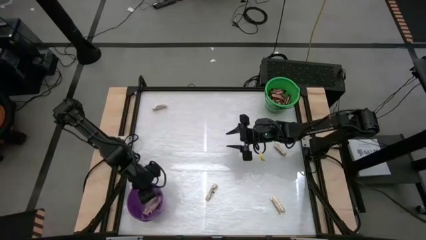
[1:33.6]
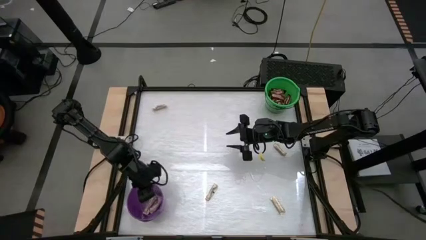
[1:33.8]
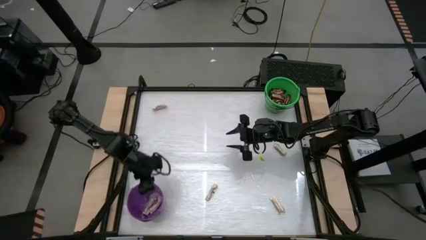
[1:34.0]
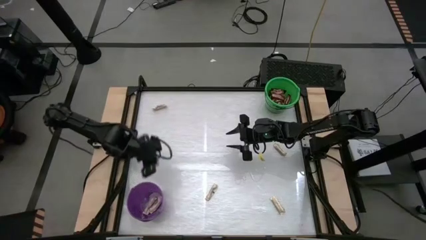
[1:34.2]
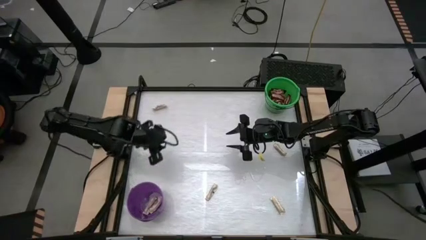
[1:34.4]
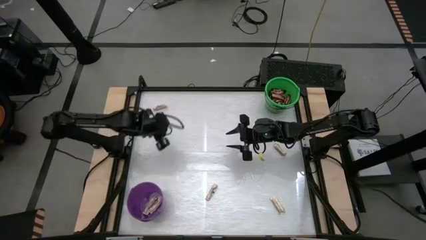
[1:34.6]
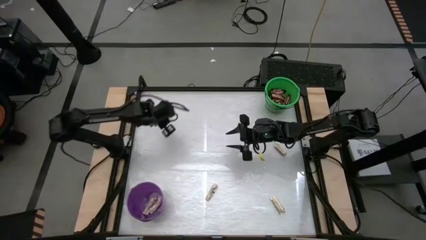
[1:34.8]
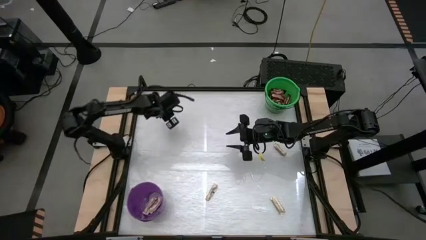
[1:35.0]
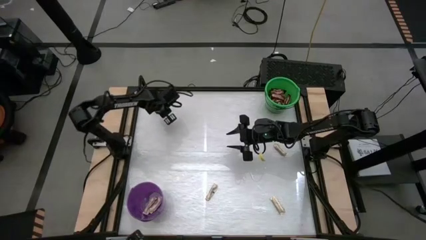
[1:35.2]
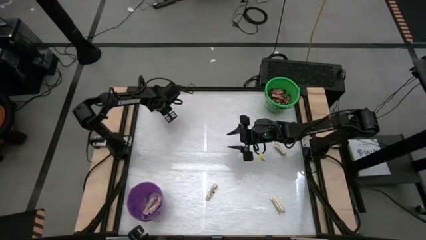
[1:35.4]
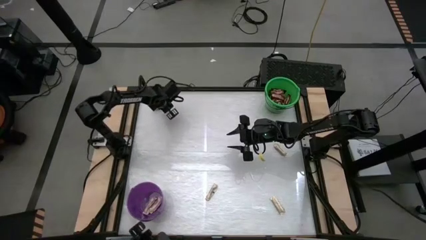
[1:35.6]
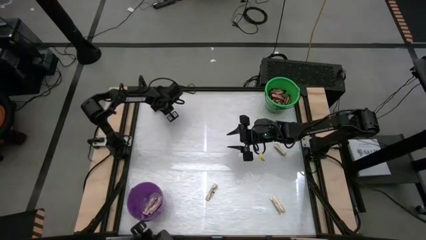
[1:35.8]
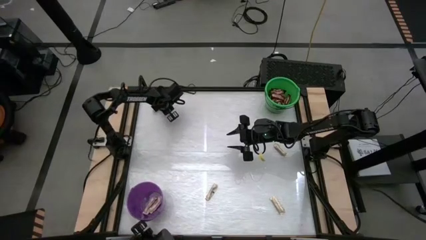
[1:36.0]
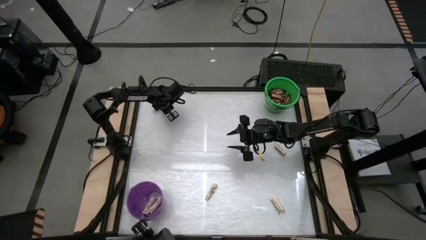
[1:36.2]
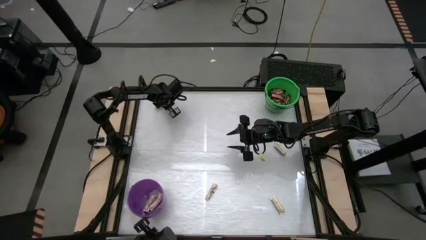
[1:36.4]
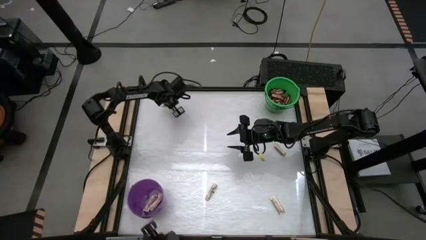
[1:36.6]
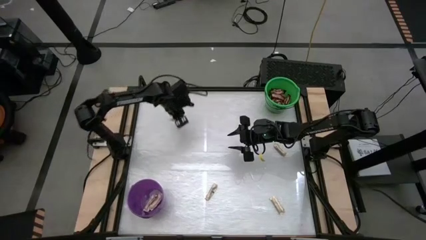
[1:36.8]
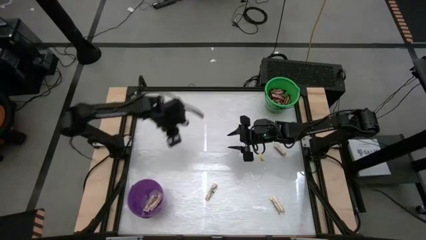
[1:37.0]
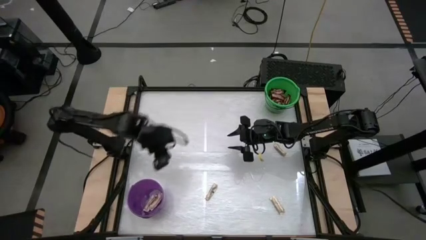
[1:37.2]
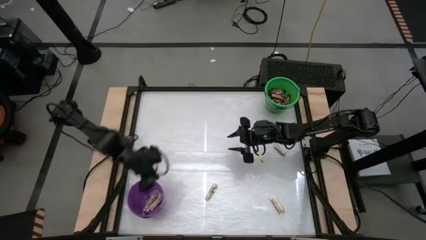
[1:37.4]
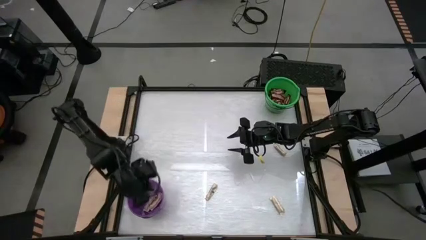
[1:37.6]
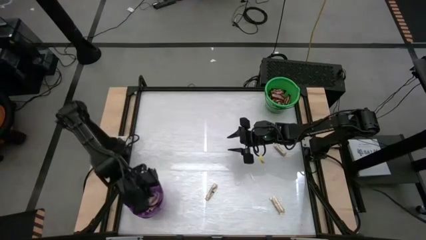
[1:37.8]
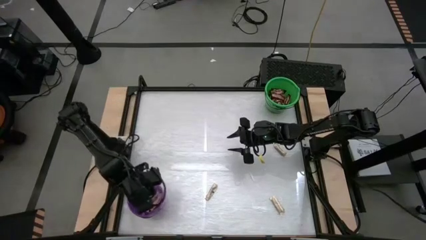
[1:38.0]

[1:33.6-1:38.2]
Task: Sort candy by brand, put in halloween buckets
Put the white candy bar into the purple bucket

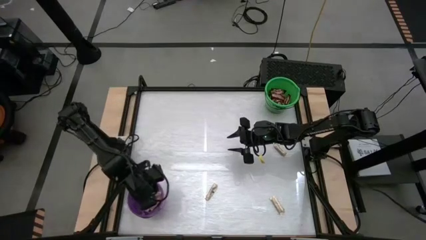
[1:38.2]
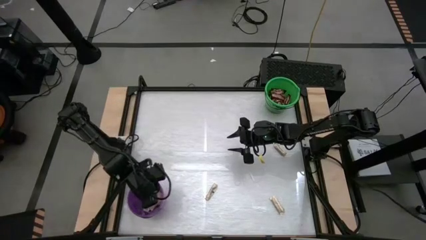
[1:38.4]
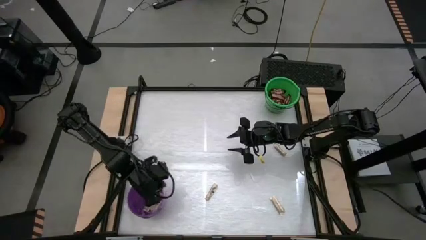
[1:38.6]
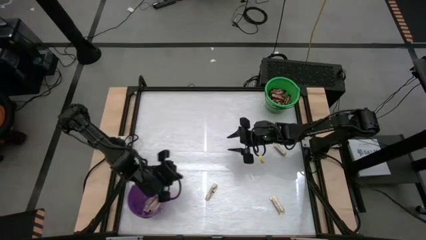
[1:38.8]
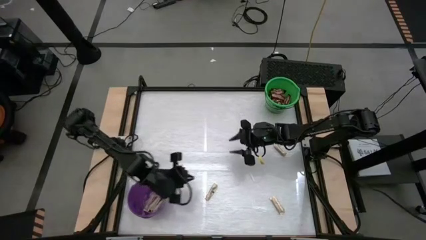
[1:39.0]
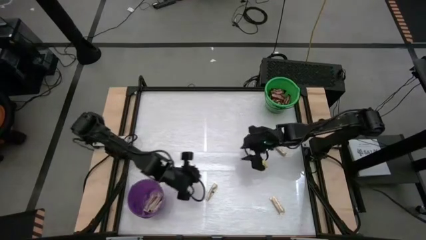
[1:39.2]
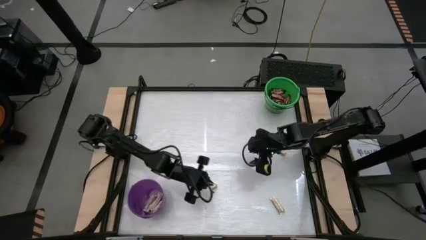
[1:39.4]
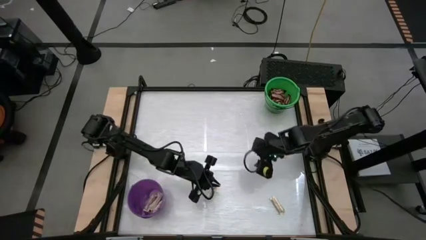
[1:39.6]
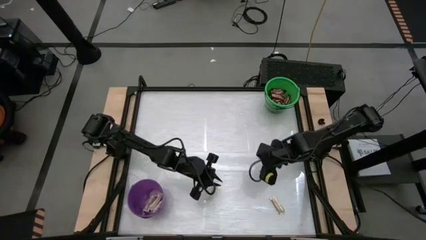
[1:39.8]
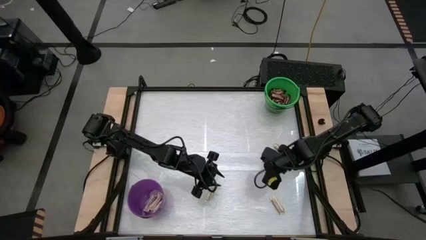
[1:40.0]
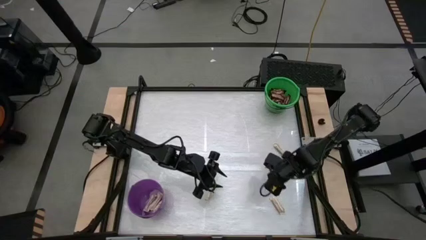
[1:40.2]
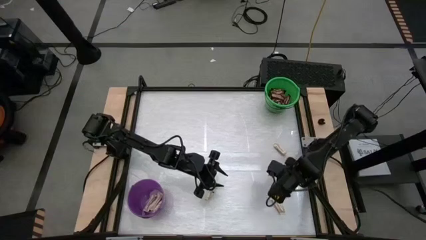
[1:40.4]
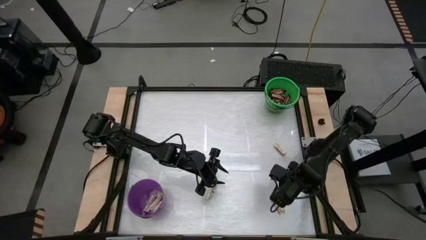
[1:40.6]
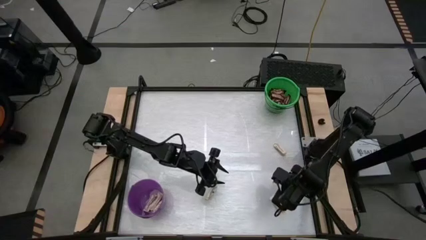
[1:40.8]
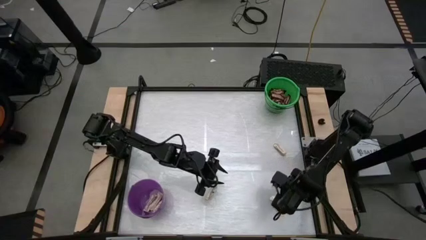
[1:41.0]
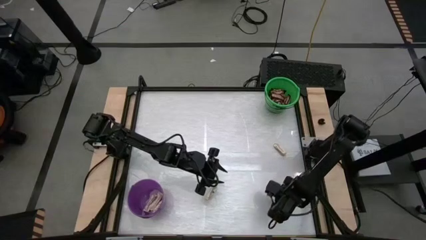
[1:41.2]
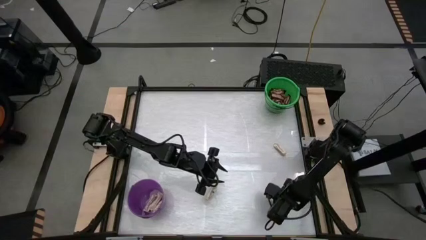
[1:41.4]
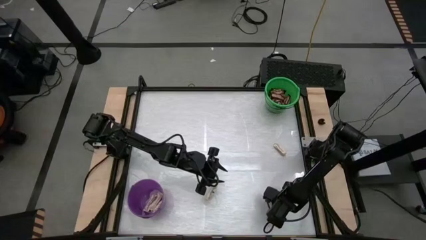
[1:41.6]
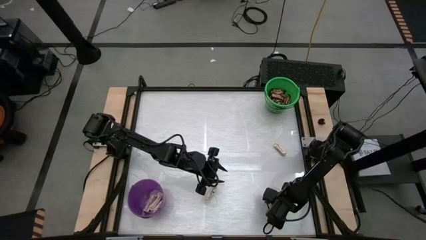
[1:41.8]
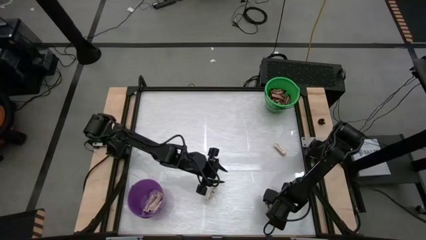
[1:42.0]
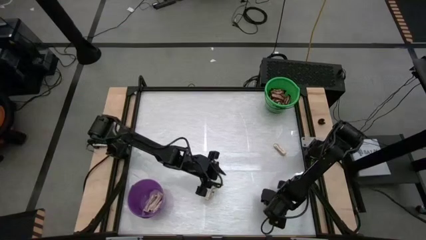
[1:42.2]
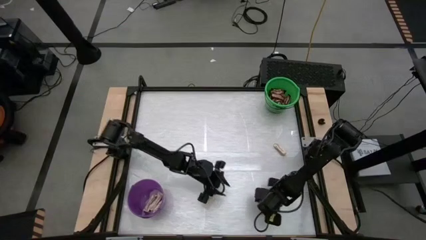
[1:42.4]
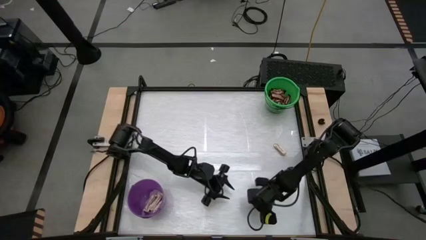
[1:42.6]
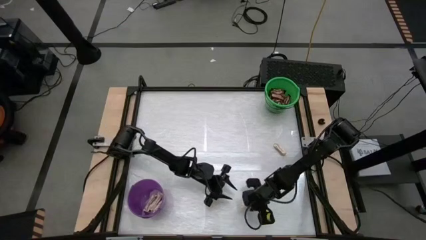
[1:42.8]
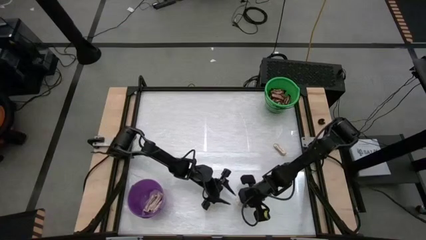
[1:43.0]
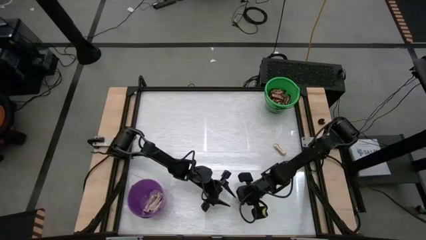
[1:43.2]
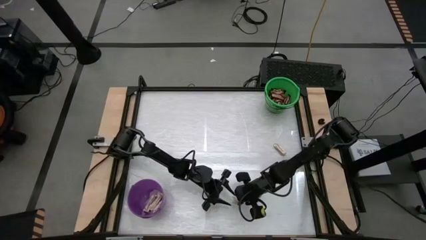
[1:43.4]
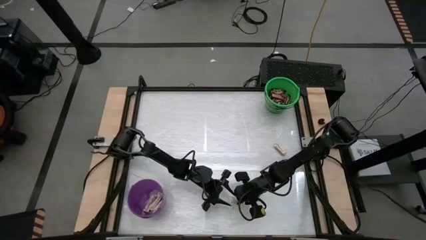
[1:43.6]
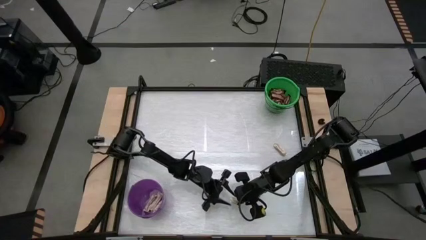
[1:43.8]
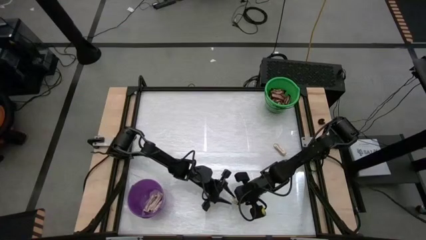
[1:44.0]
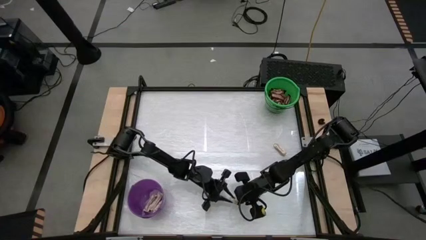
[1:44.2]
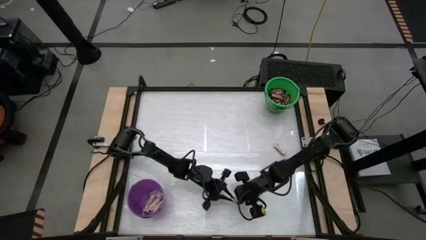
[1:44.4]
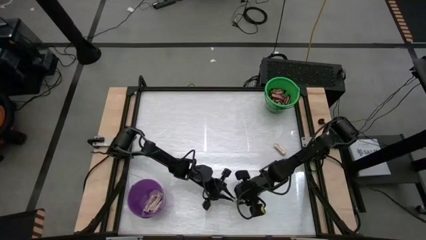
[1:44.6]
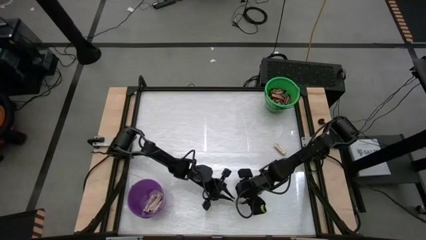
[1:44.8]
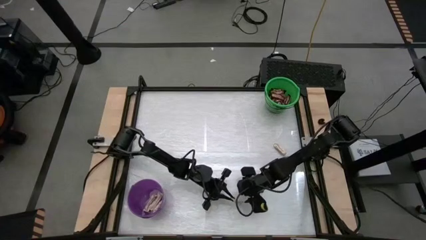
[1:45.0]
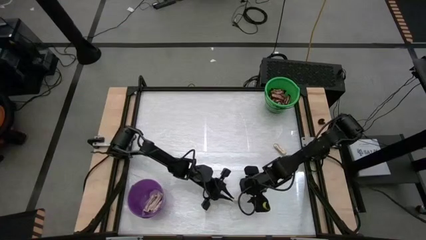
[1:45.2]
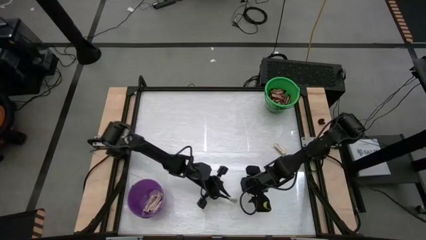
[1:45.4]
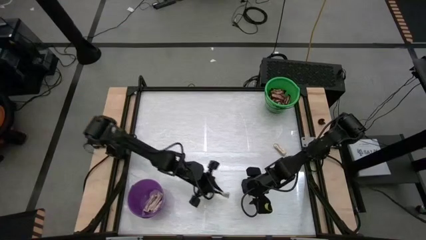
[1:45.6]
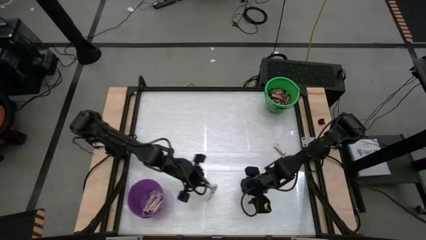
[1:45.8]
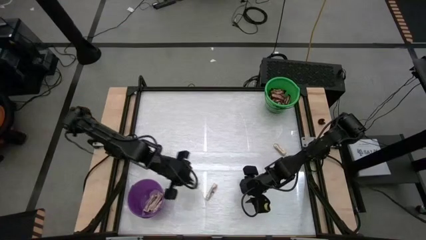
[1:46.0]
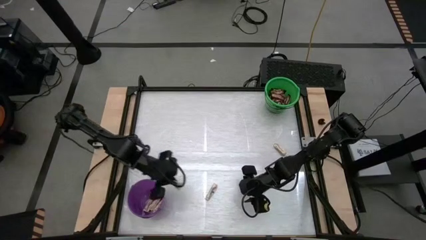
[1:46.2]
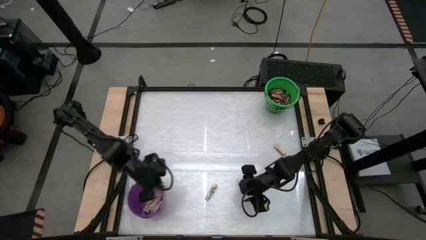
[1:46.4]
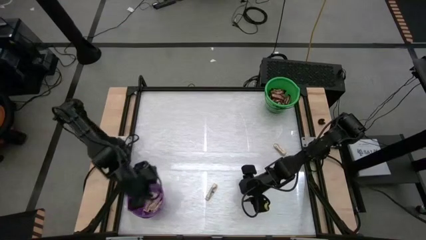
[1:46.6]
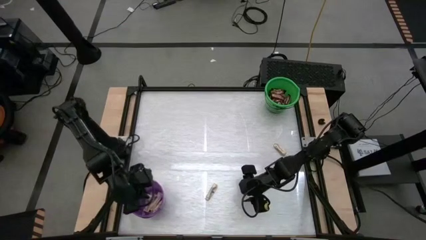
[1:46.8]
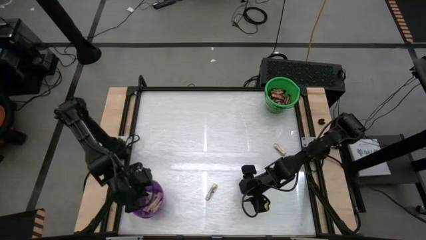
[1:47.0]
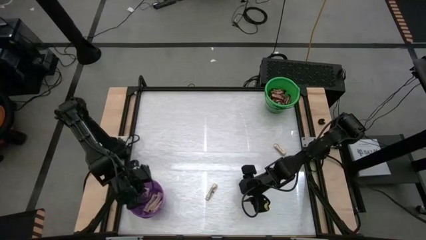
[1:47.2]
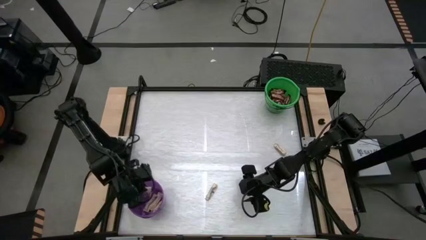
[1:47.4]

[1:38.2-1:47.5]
Put the white candy bar into the purple bucket
